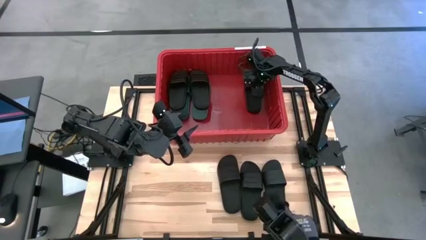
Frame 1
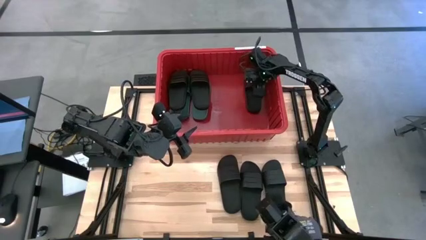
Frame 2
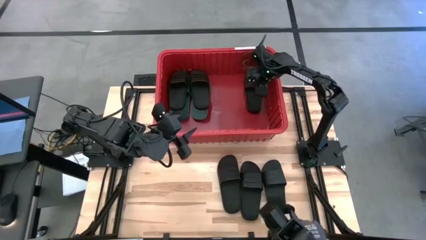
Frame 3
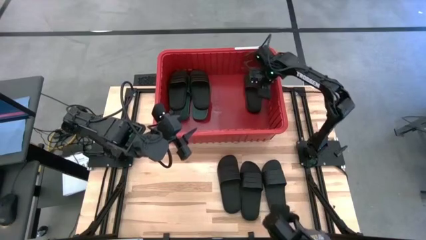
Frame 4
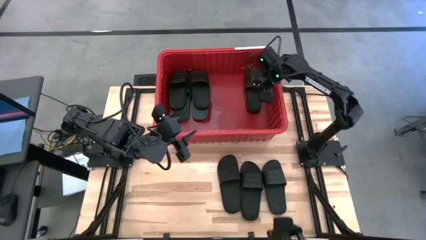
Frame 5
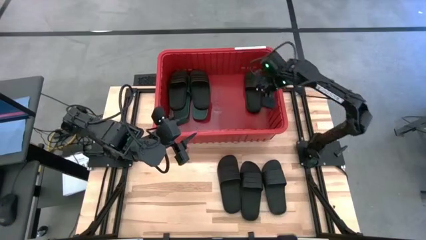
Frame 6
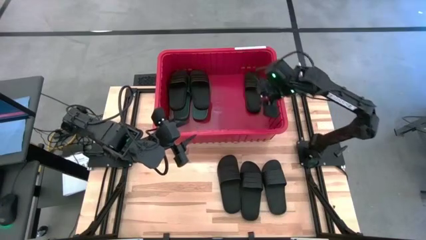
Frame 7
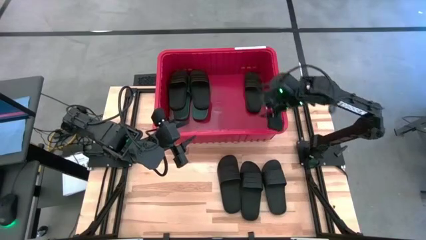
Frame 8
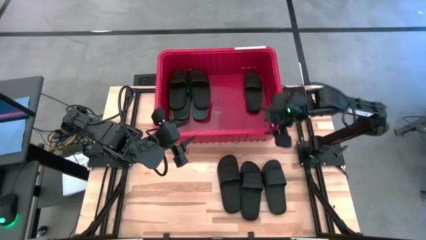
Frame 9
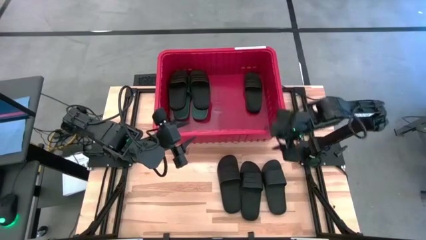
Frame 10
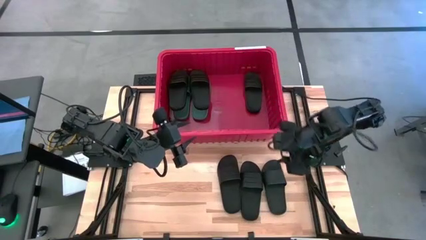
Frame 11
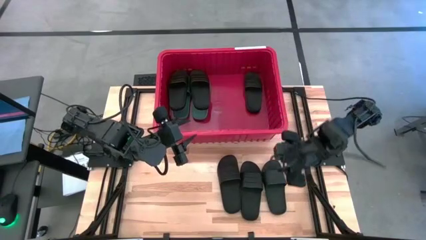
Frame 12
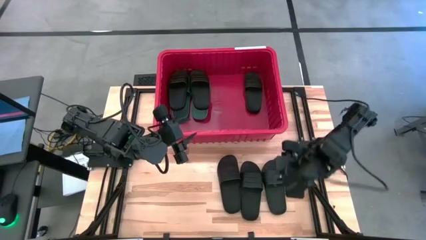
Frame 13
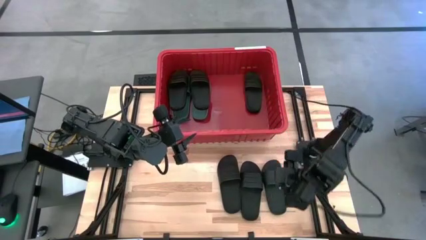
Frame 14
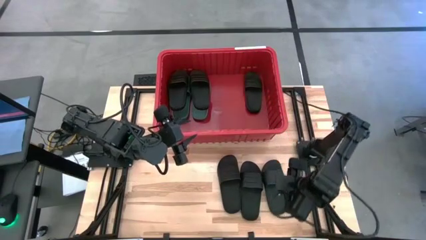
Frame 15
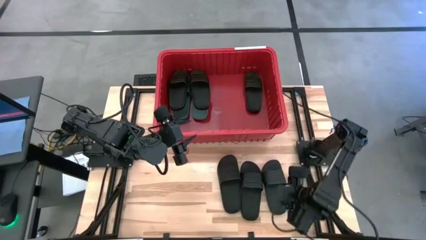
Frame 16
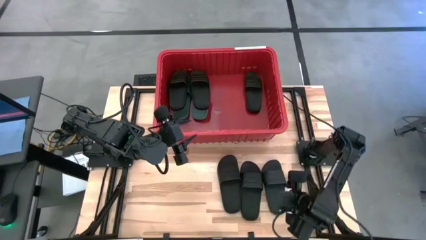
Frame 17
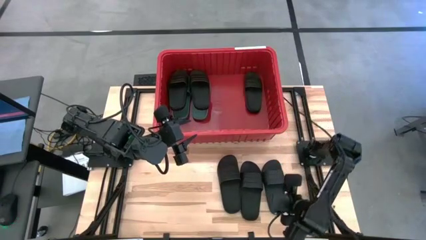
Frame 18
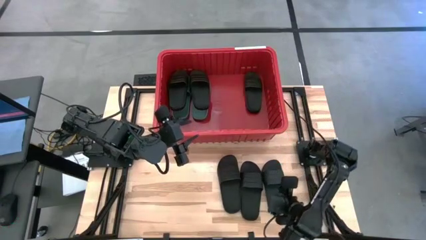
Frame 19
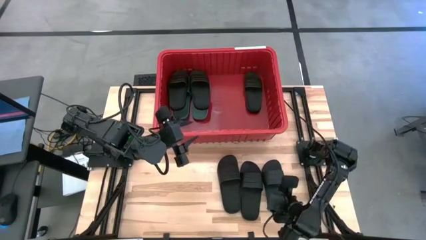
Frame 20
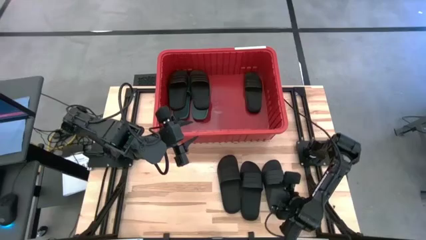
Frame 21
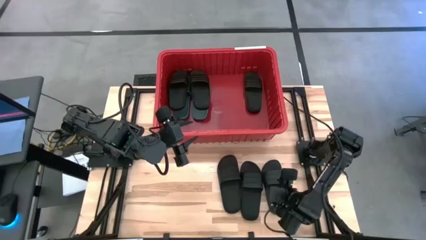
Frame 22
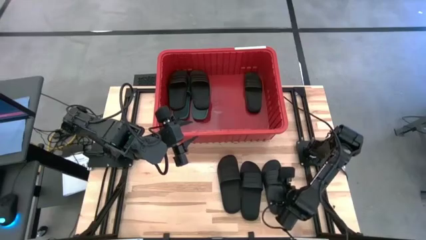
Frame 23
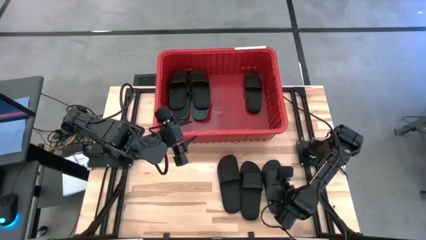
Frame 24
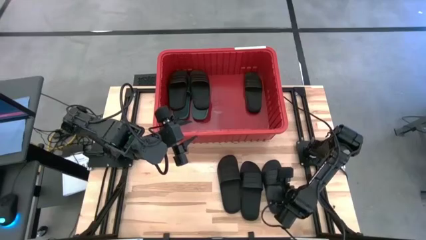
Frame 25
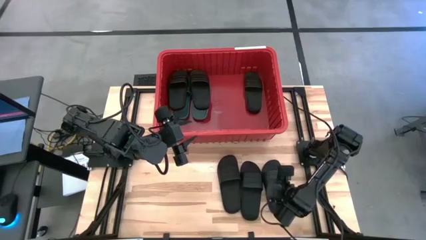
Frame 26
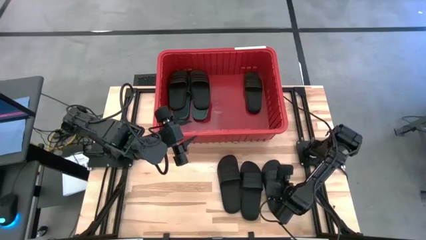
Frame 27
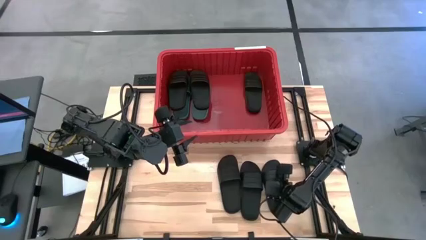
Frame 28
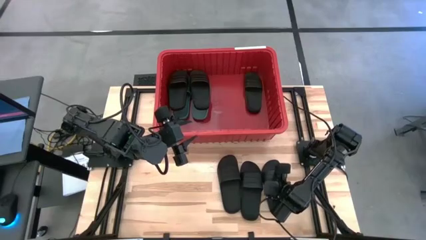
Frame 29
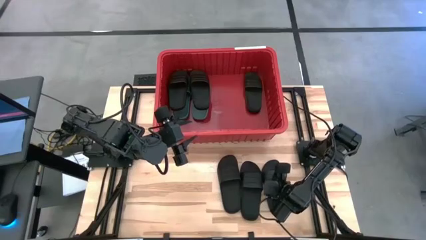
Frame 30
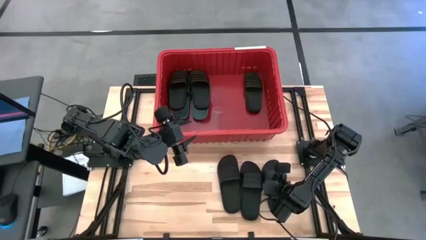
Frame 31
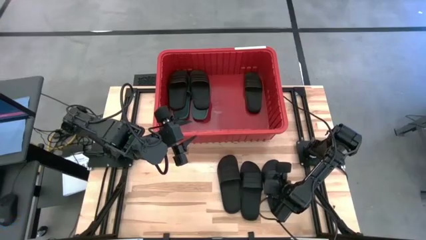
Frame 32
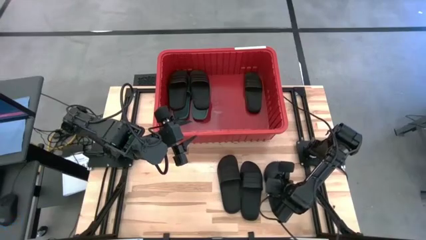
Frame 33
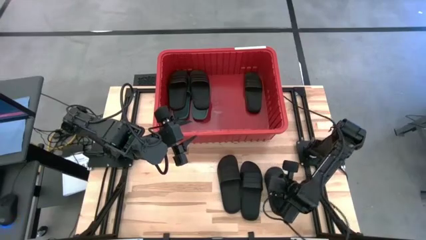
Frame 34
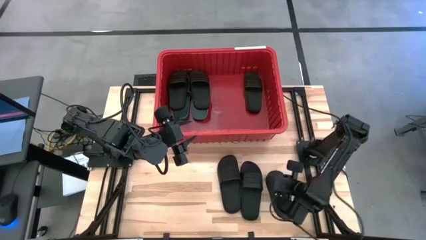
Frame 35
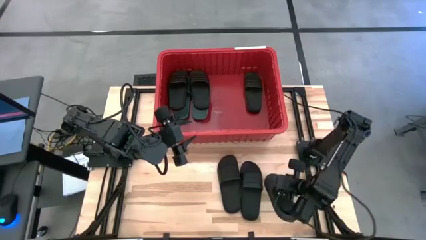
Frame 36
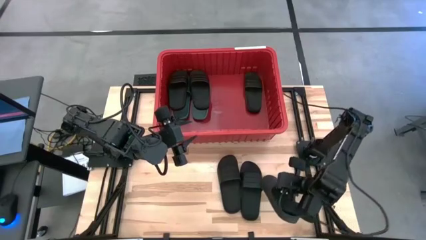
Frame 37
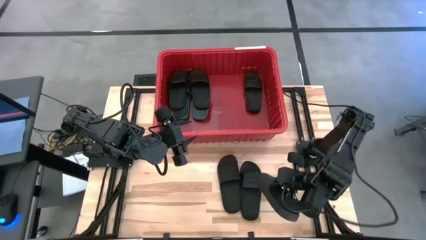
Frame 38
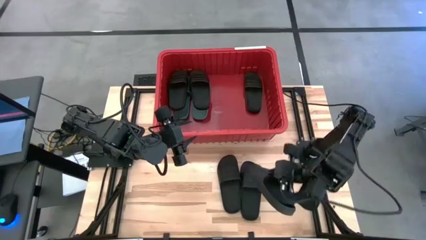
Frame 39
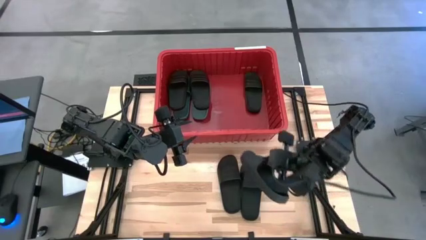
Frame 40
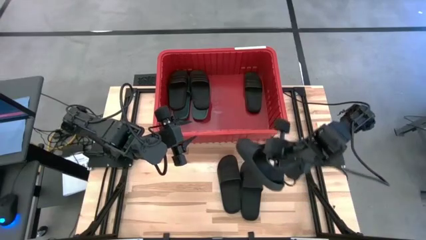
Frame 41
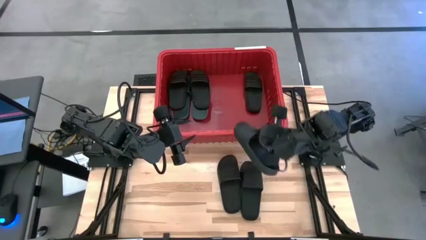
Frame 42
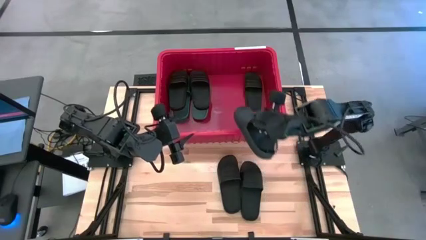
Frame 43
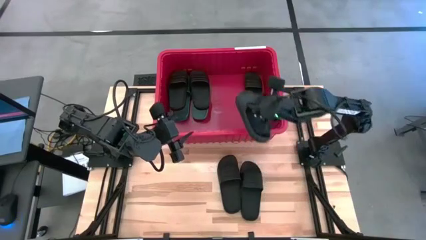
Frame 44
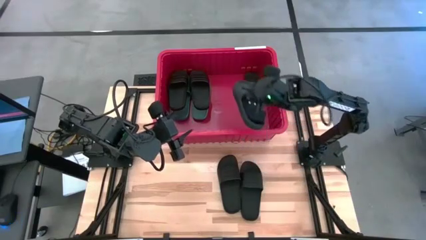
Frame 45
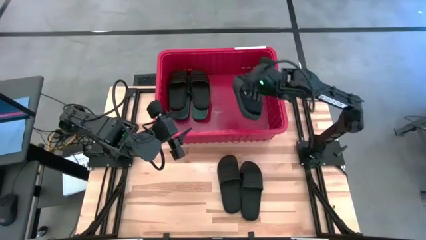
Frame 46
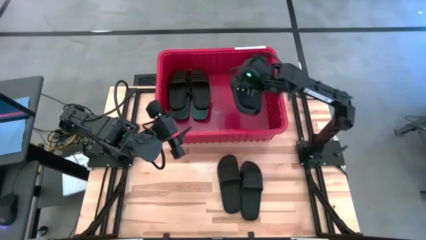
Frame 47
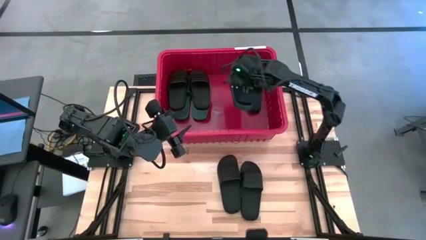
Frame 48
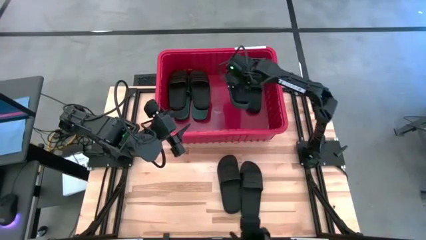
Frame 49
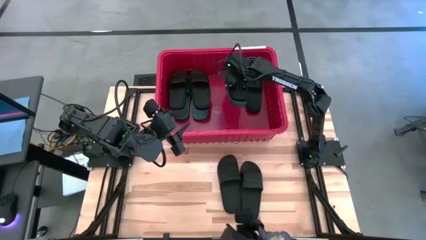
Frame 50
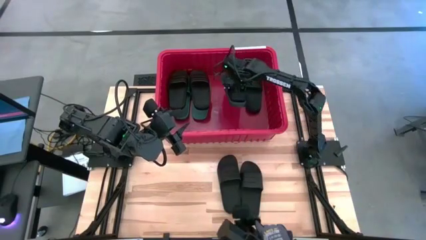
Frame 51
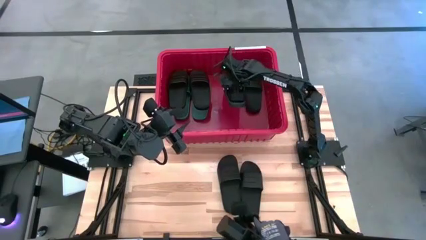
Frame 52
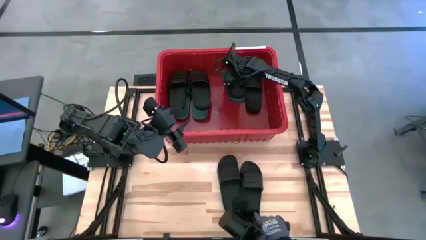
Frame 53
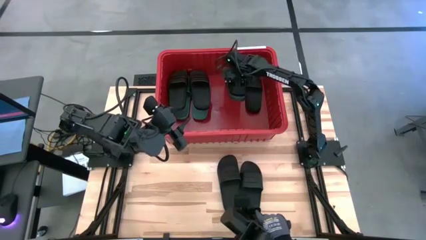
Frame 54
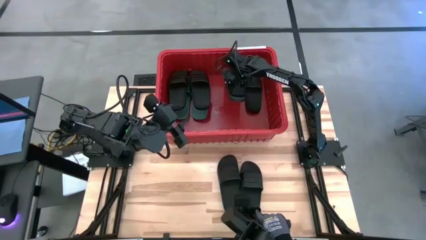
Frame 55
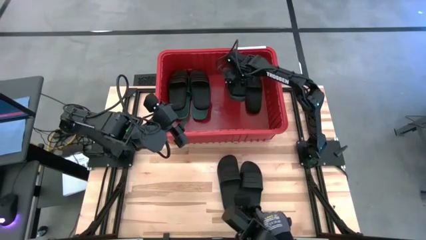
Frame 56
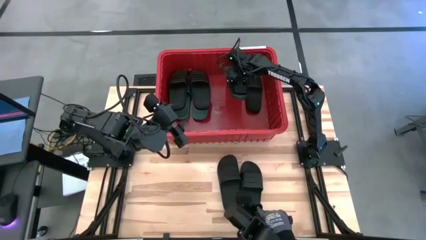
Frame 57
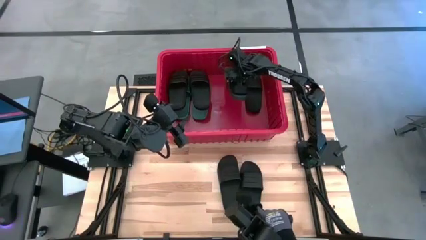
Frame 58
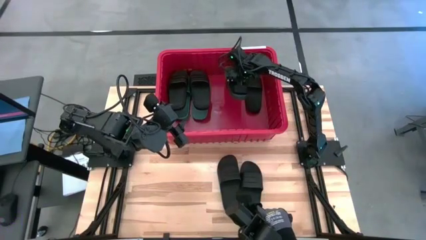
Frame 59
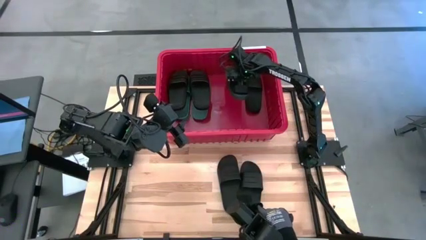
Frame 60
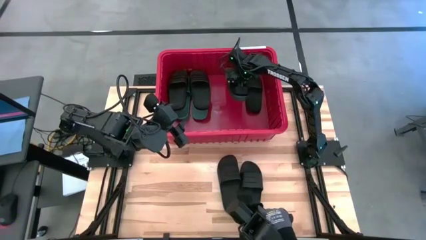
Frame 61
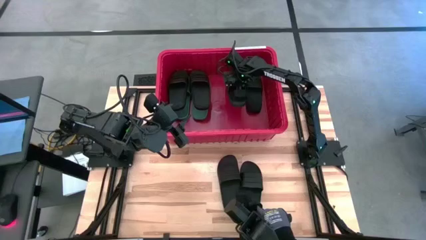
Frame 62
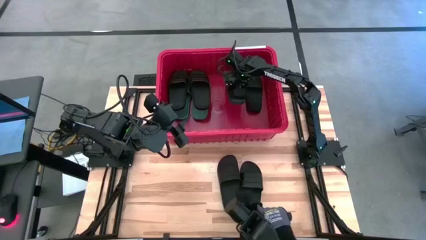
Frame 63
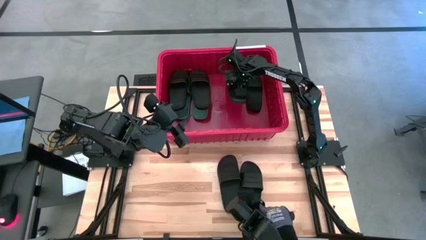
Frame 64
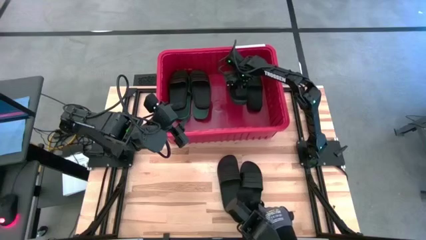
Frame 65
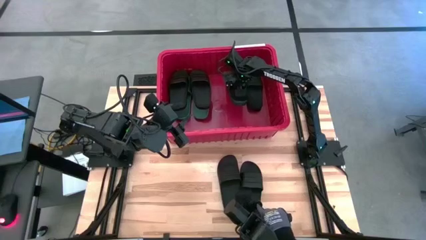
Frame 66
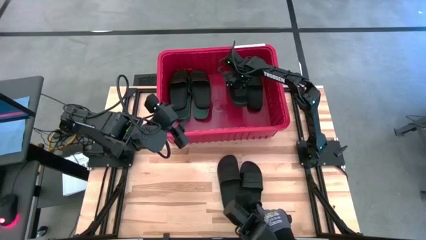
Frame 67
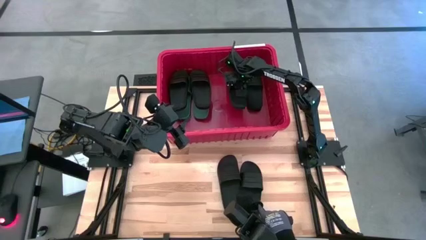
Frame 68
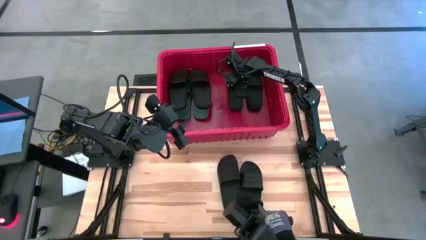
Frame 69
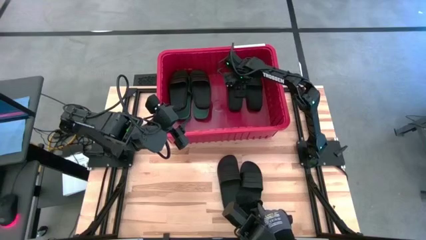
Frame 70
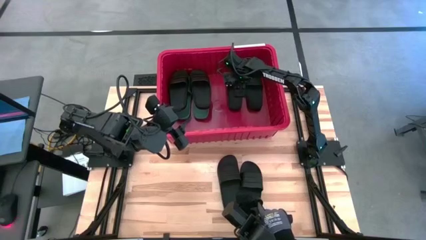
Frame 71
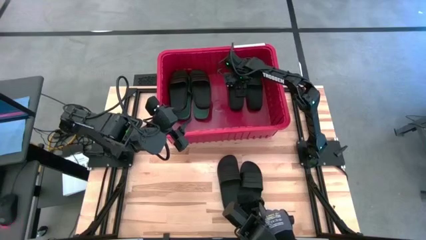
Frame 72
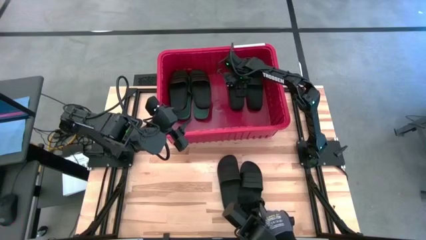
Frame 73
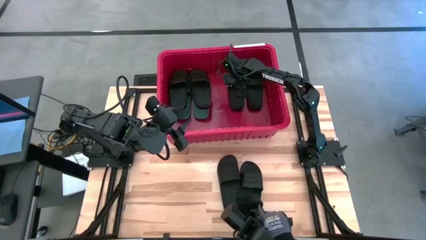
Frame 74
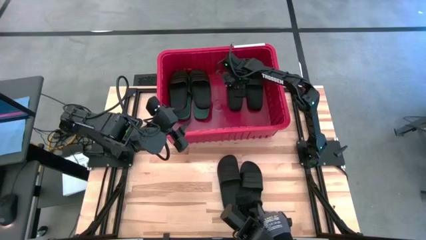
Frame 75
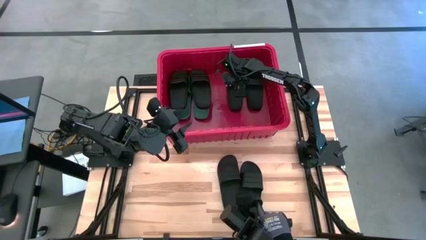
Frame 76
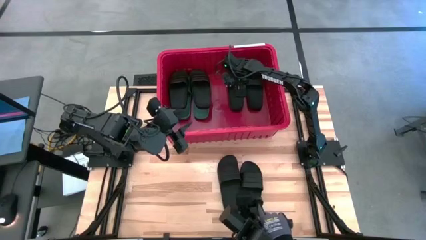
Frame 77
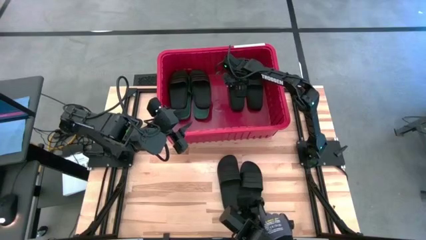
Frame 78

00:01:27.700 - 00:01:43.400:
Task: Pick and place slides into bin
Put the black slide into the red bin
